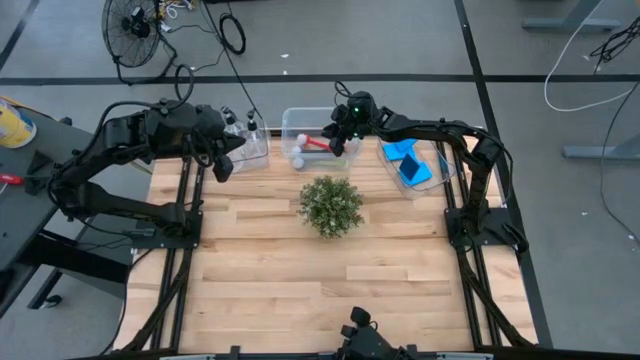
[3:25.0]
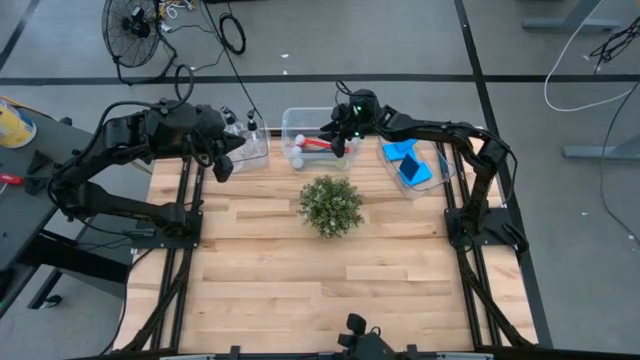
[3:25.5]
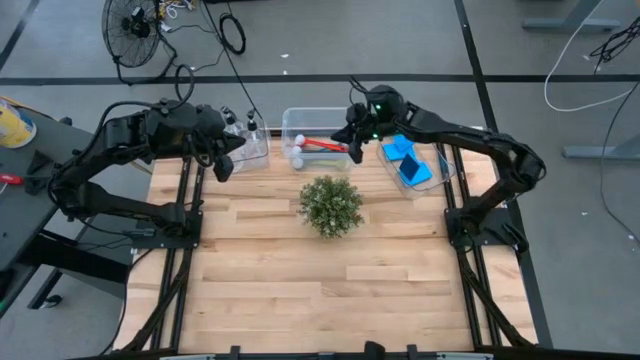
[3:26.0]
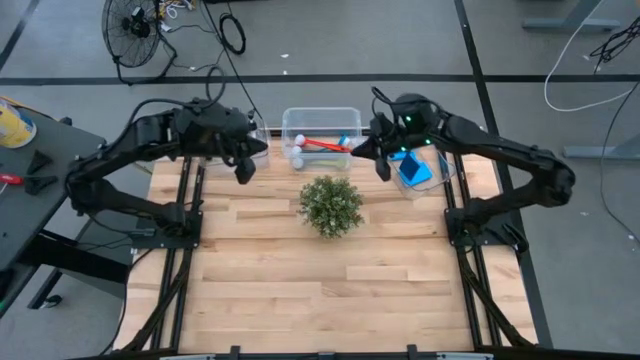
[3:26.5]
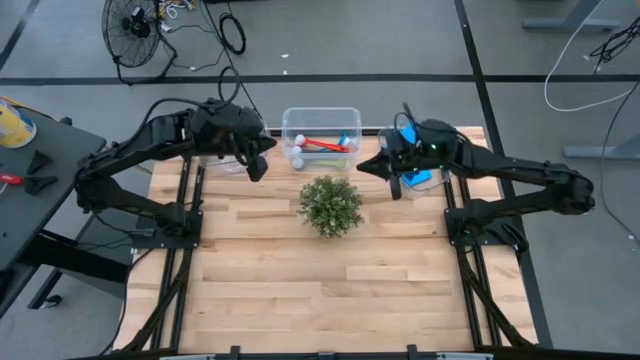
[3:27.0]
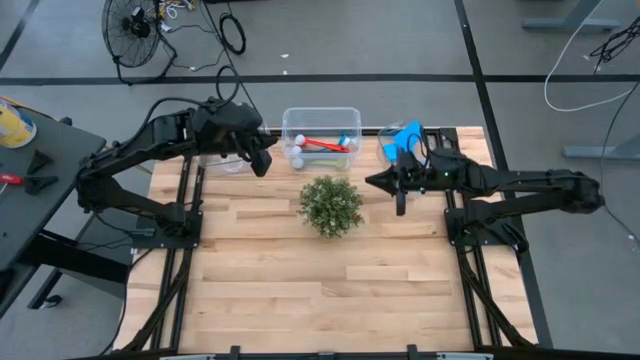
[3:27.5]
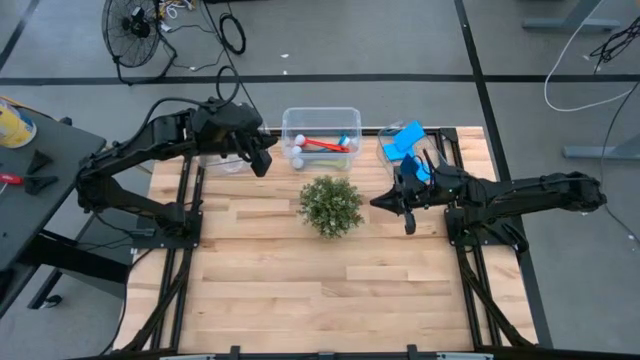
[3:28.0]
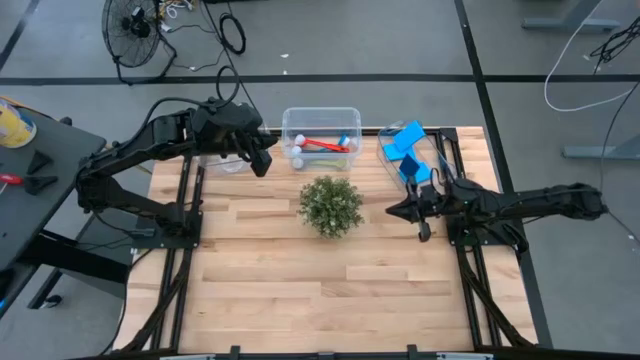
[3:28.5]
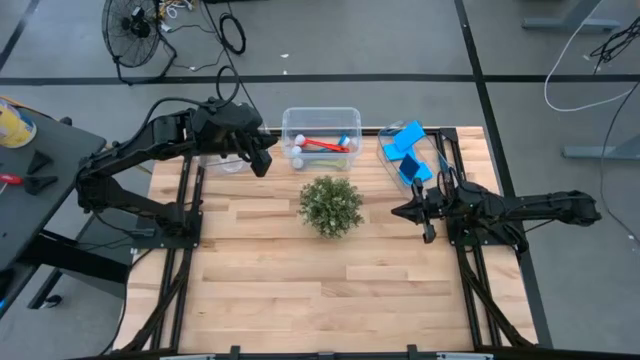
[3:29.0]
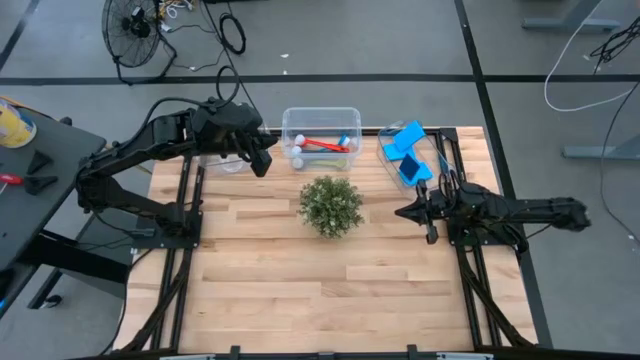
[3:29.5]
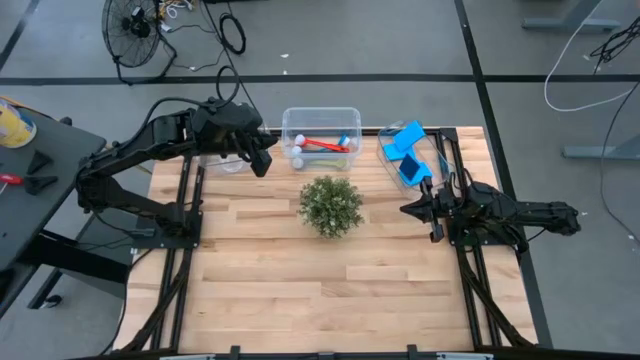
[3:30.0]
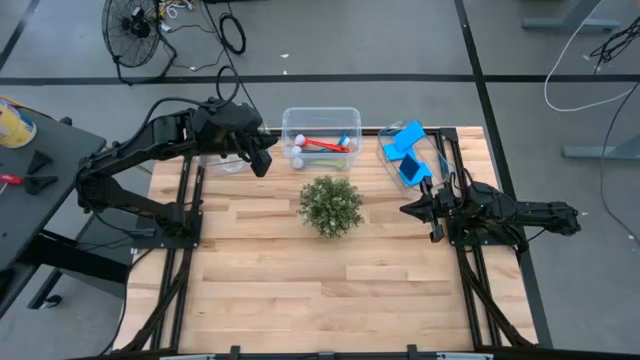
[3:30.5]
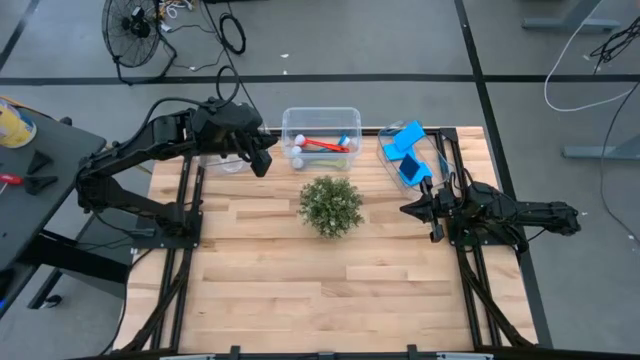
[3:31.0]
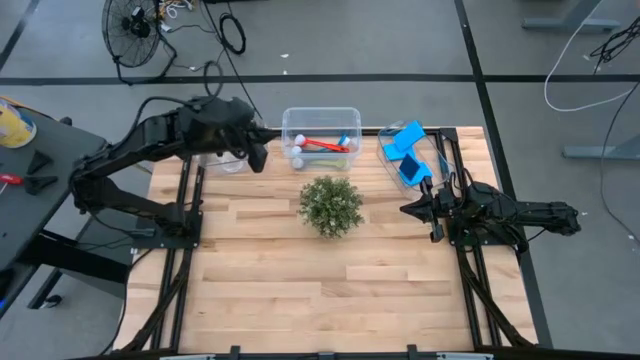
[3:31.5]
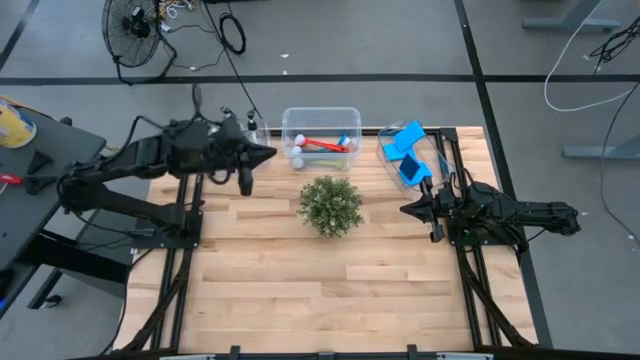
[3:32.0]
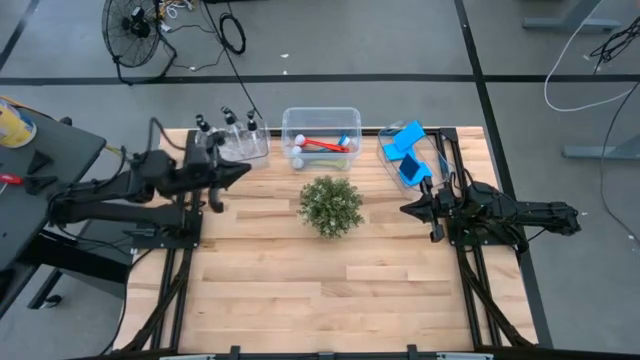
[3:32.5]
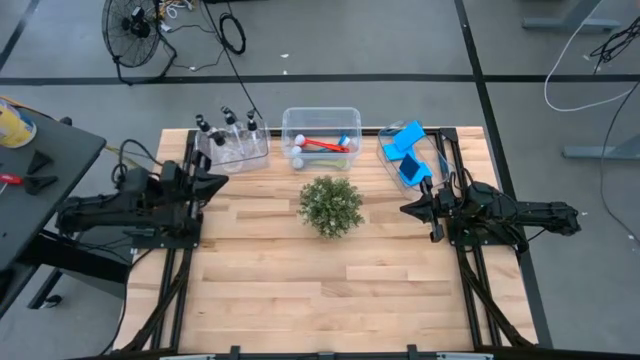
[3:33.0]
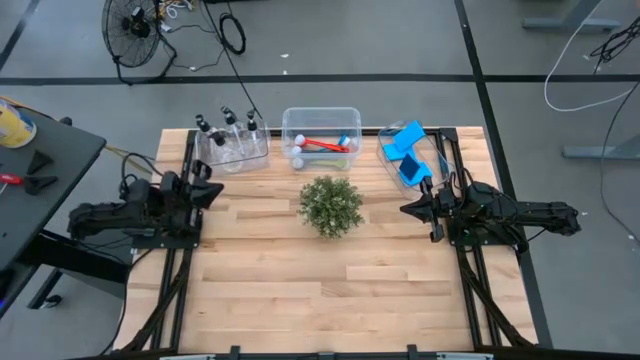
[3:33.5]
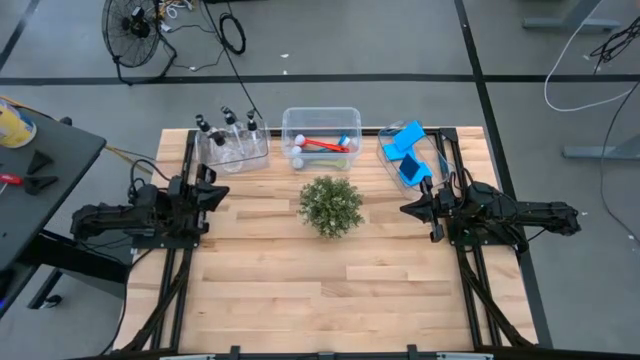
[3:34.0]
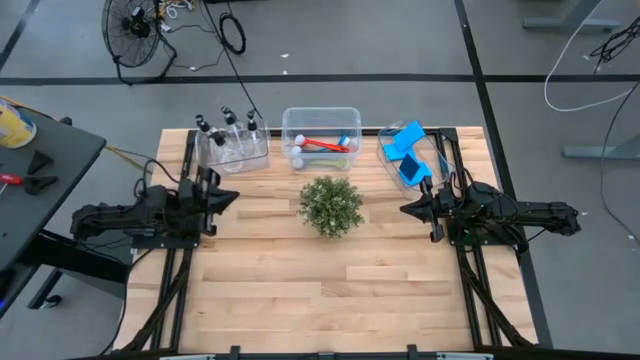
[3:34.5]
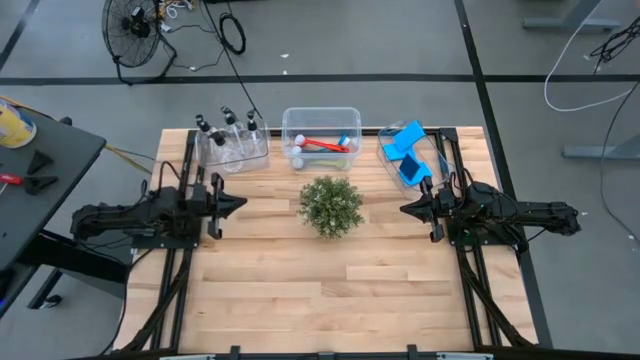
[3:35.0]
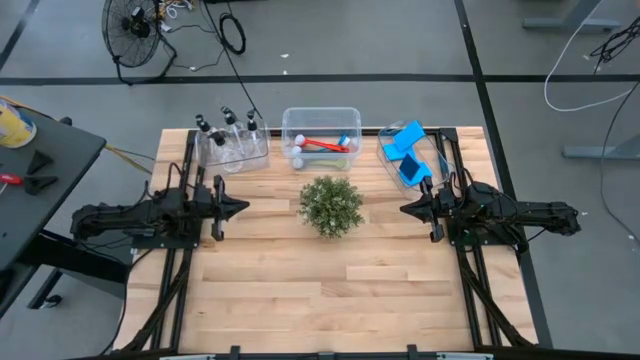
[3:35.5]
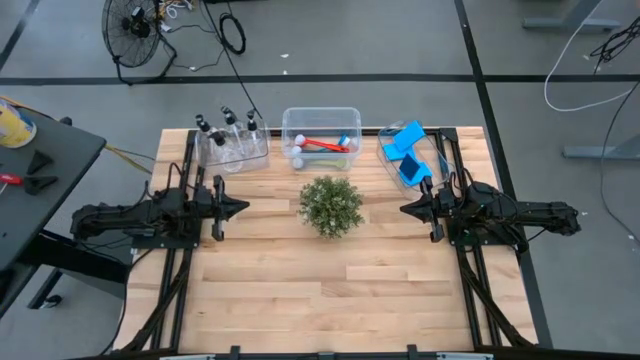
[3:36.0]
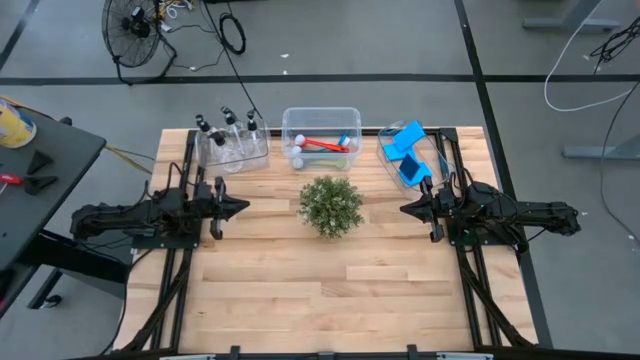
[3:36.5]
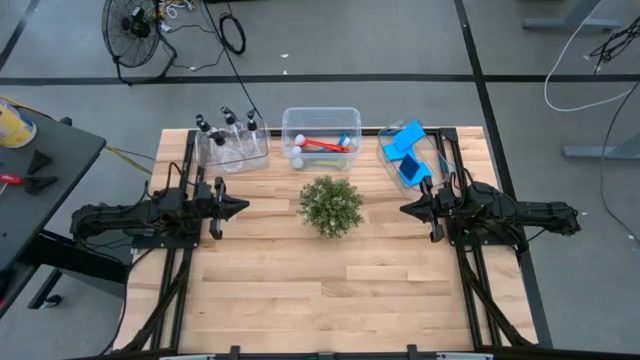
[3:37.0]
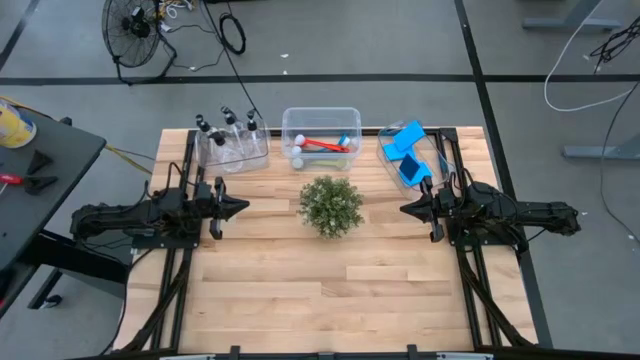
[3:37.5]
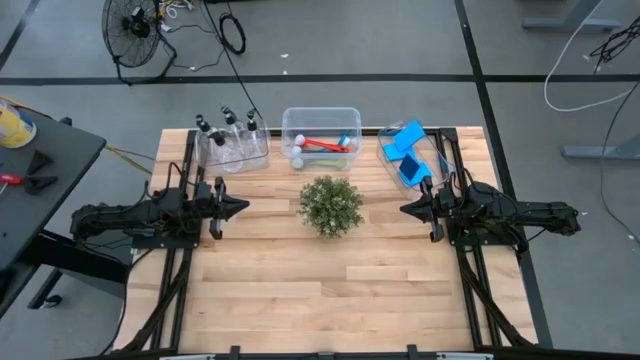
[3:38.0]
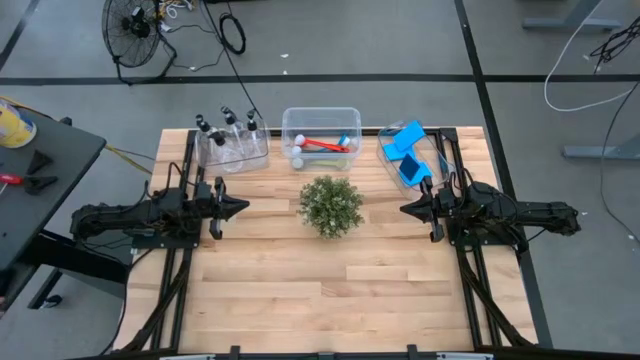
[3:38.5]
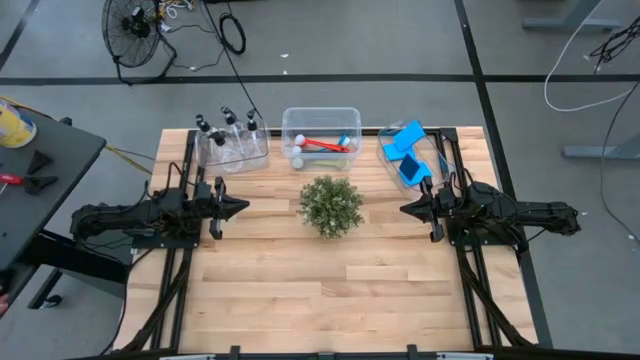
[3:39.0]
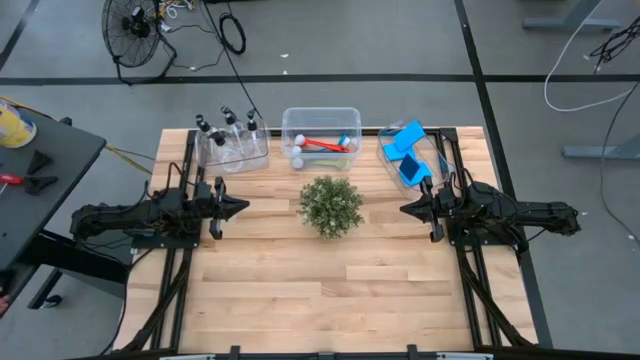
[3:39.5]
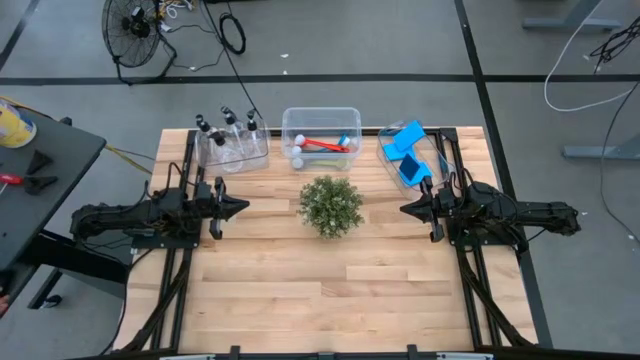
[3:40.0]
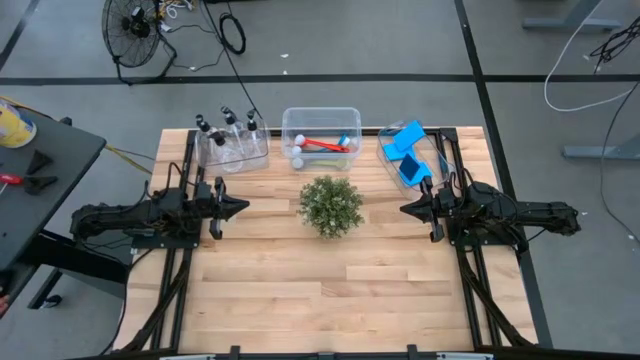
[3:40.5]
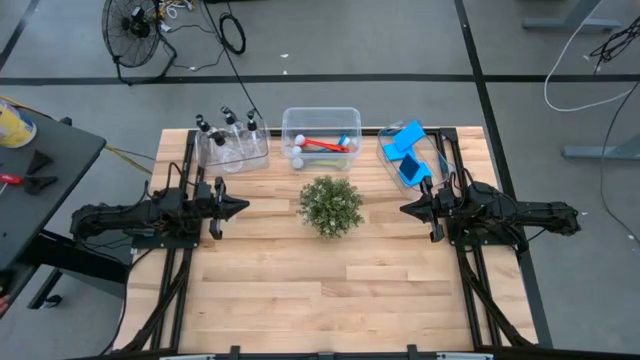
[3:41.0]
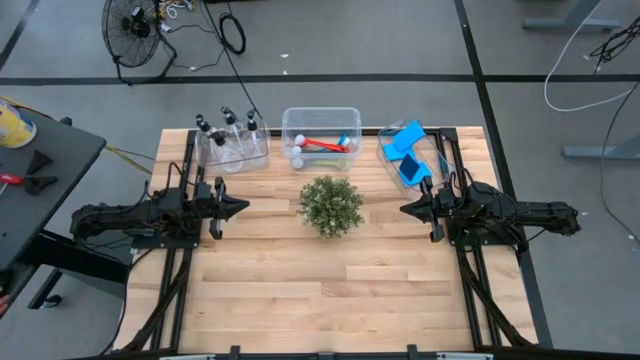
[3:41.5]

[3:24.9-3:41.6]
Task: Pick & Place Kitchen Sink Supplies
Return to Home Position
